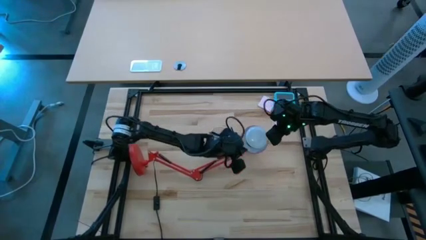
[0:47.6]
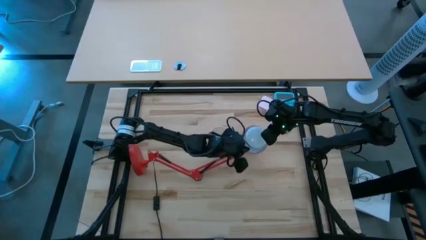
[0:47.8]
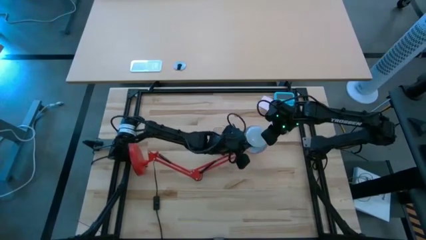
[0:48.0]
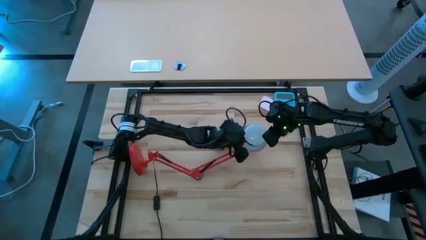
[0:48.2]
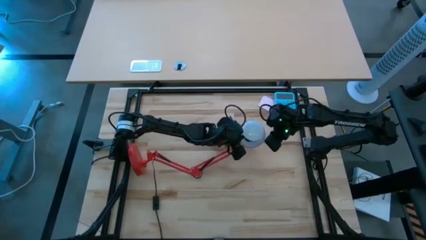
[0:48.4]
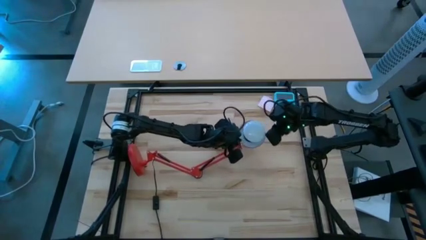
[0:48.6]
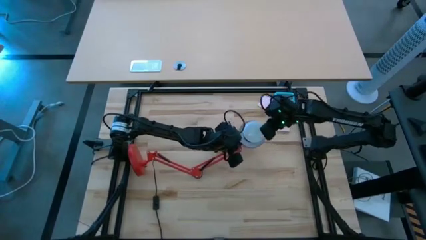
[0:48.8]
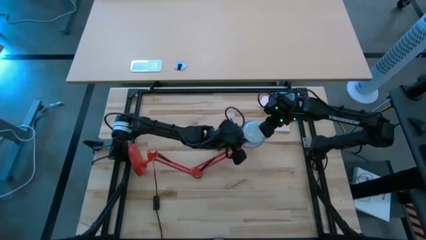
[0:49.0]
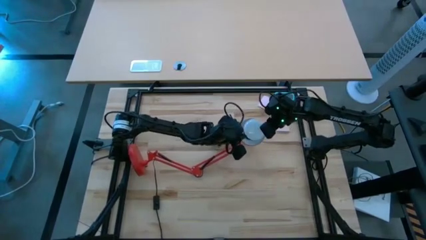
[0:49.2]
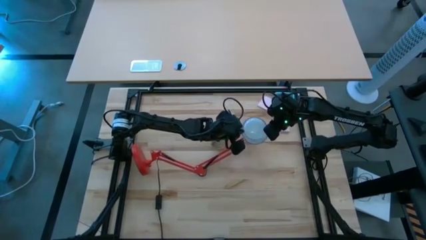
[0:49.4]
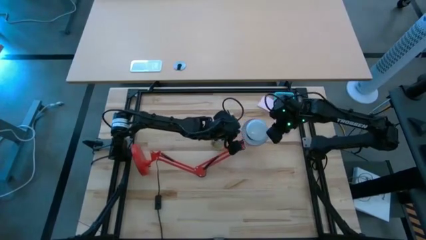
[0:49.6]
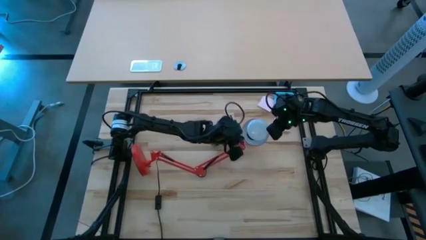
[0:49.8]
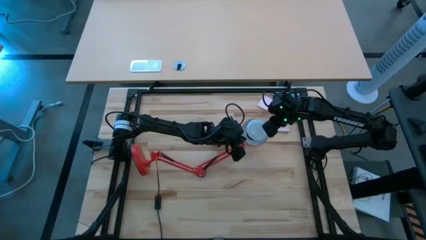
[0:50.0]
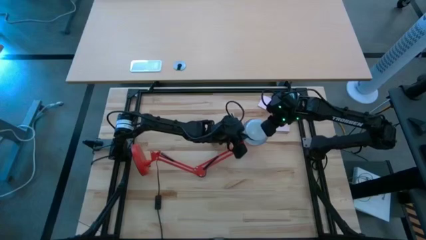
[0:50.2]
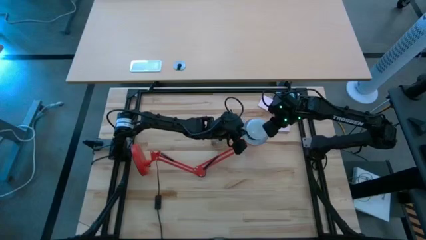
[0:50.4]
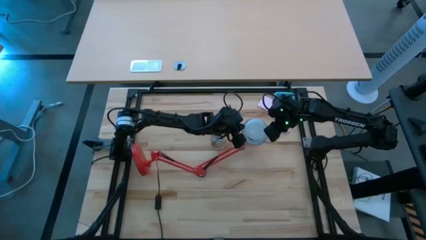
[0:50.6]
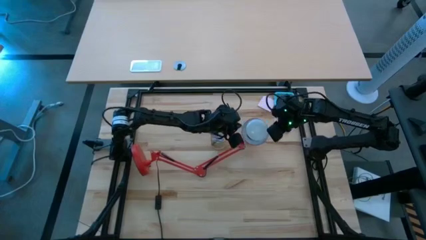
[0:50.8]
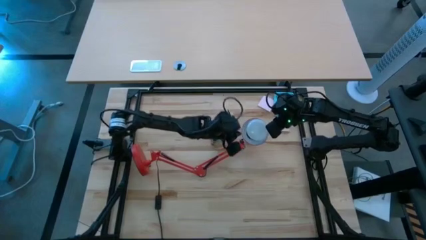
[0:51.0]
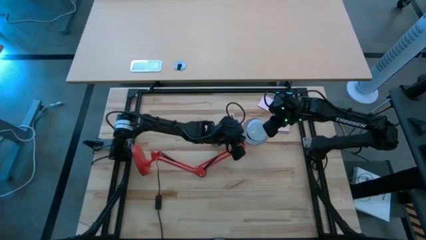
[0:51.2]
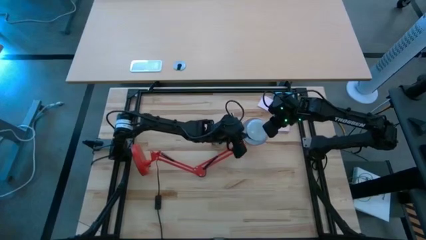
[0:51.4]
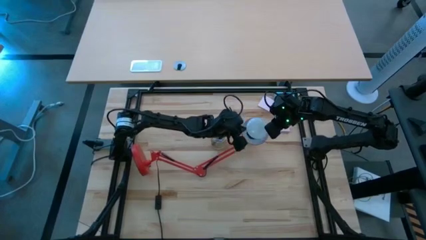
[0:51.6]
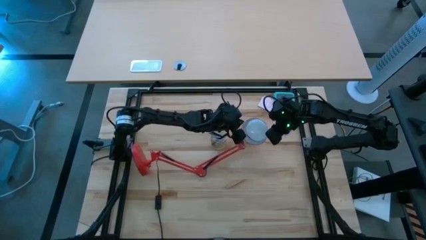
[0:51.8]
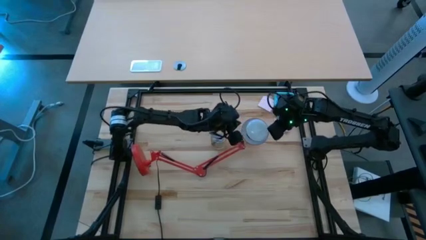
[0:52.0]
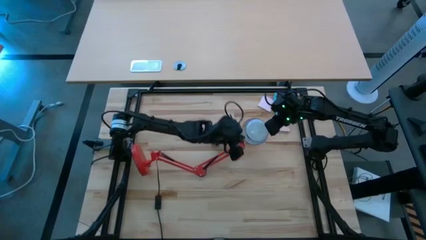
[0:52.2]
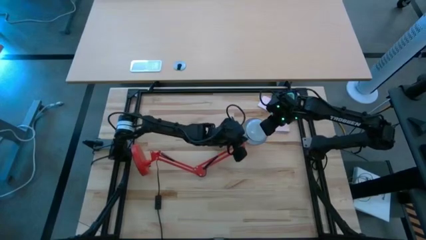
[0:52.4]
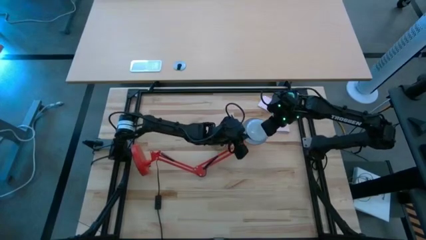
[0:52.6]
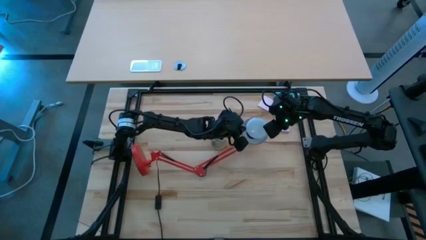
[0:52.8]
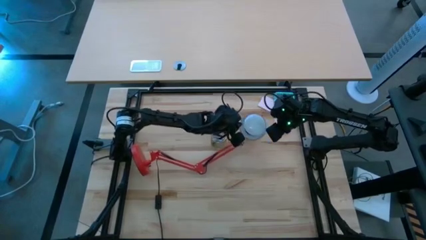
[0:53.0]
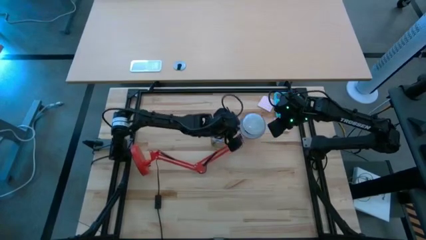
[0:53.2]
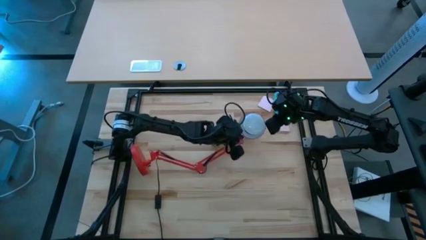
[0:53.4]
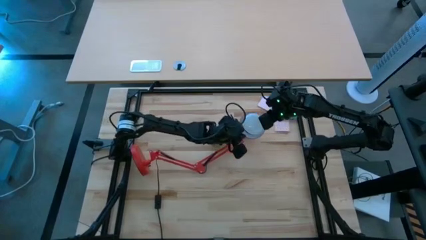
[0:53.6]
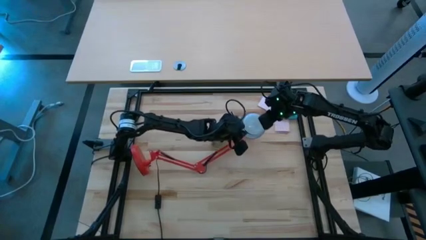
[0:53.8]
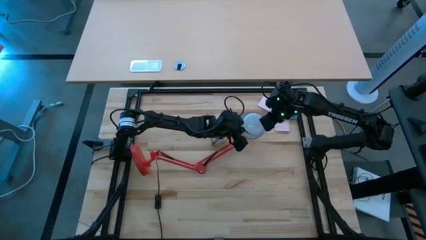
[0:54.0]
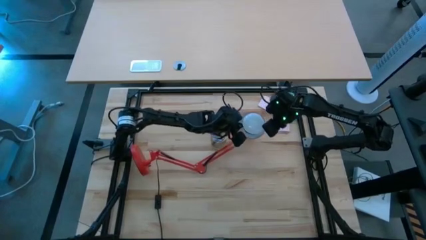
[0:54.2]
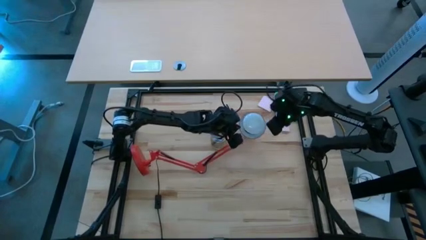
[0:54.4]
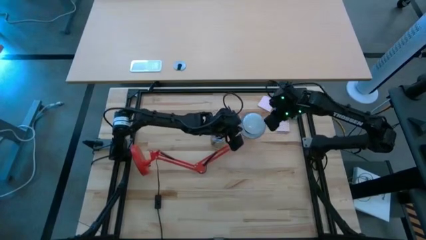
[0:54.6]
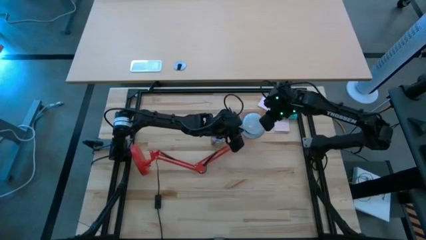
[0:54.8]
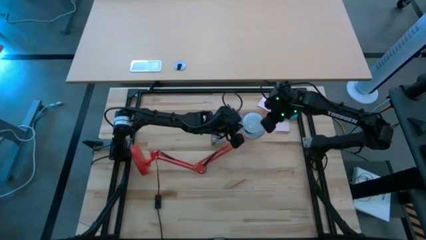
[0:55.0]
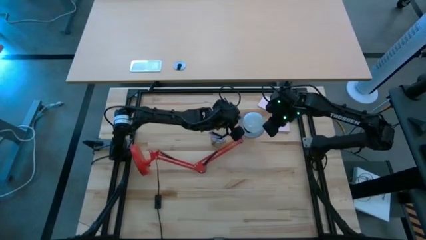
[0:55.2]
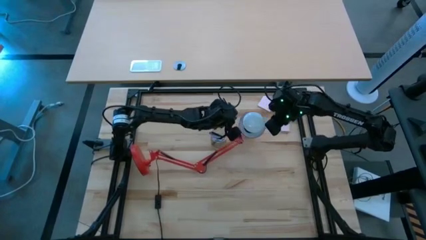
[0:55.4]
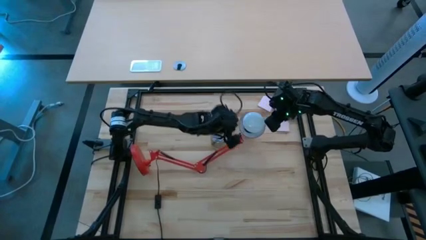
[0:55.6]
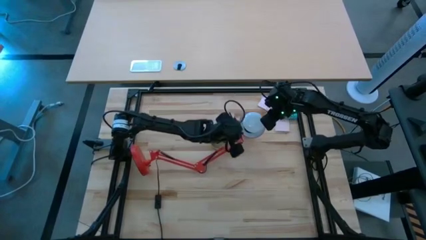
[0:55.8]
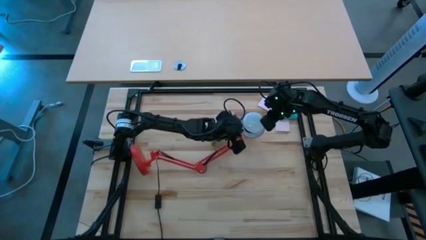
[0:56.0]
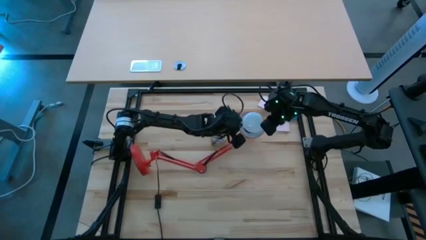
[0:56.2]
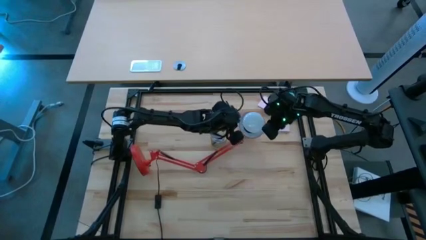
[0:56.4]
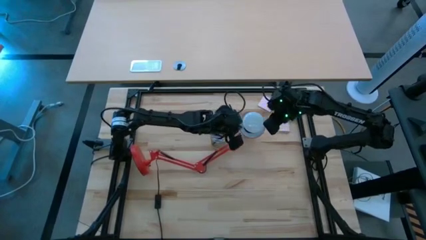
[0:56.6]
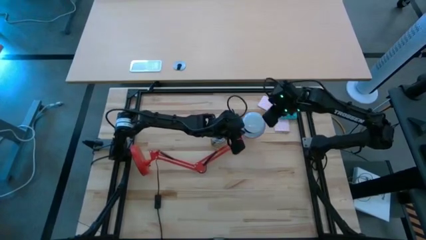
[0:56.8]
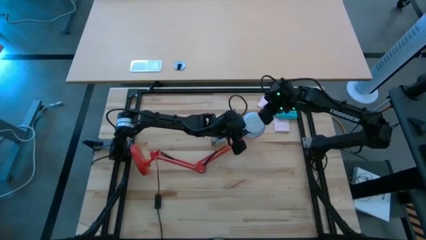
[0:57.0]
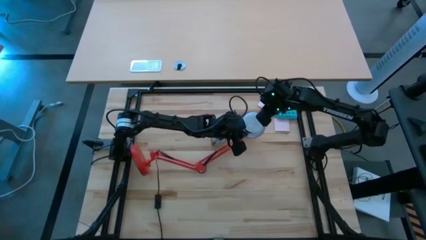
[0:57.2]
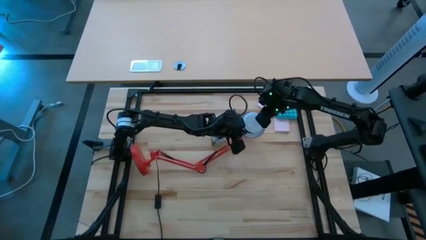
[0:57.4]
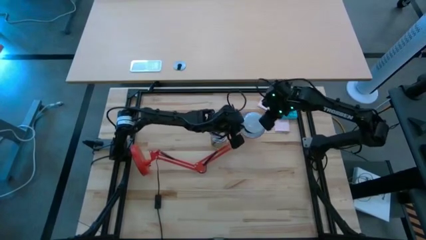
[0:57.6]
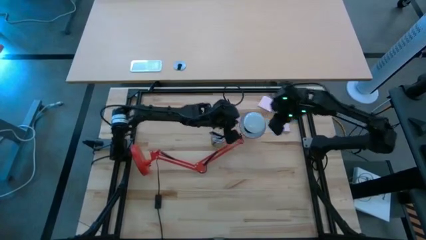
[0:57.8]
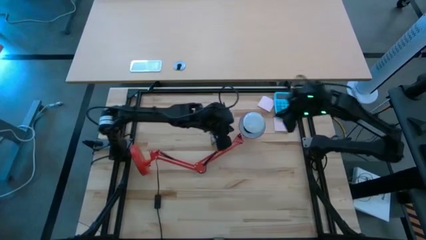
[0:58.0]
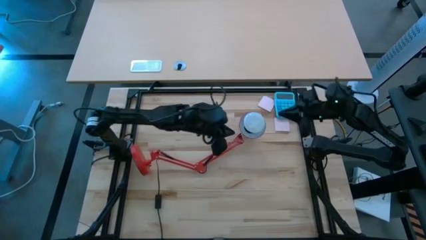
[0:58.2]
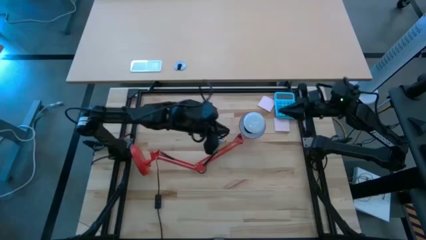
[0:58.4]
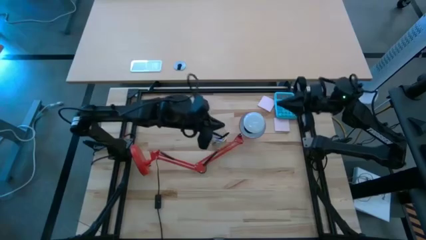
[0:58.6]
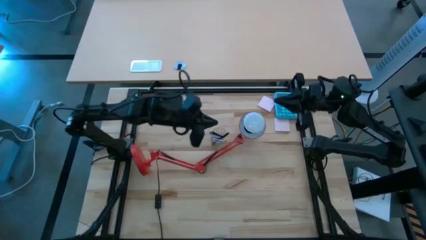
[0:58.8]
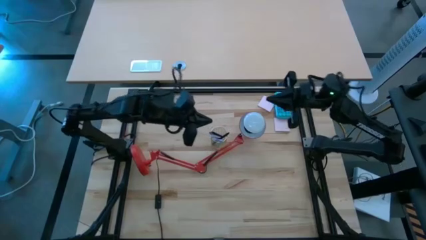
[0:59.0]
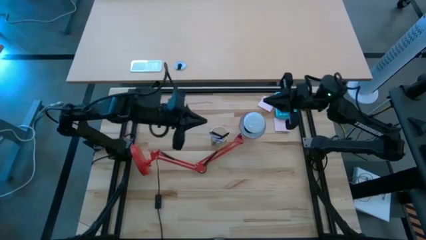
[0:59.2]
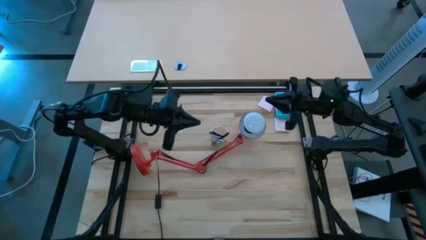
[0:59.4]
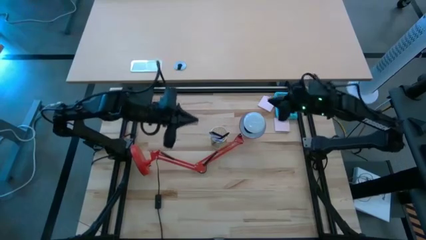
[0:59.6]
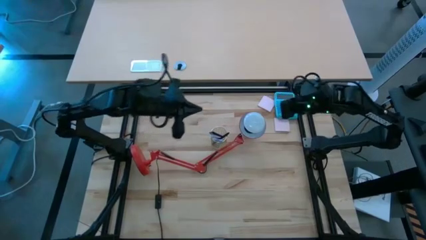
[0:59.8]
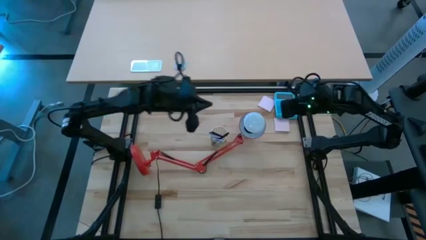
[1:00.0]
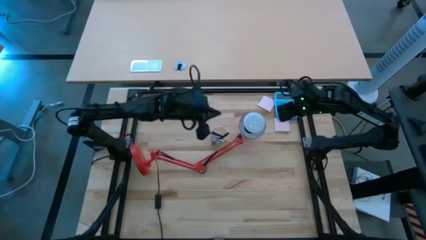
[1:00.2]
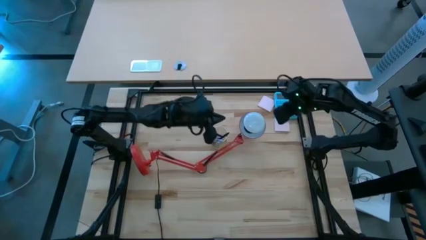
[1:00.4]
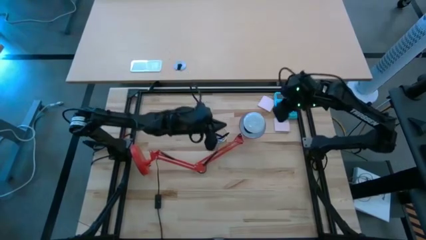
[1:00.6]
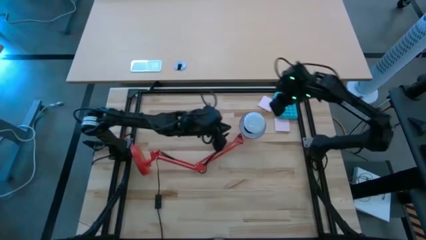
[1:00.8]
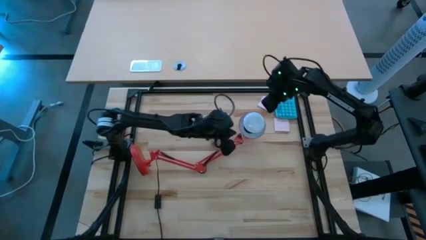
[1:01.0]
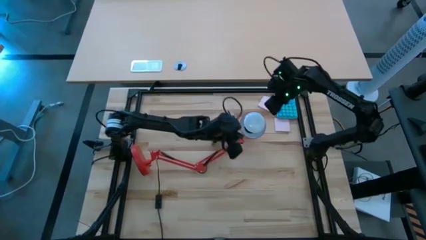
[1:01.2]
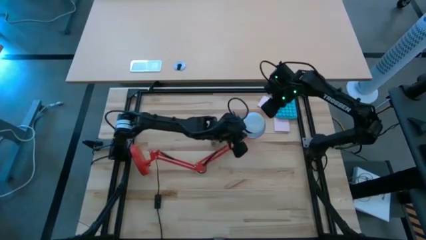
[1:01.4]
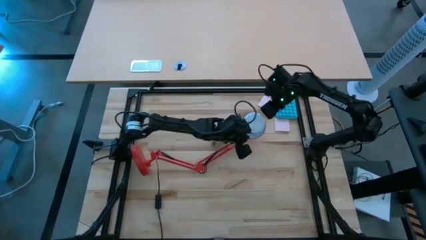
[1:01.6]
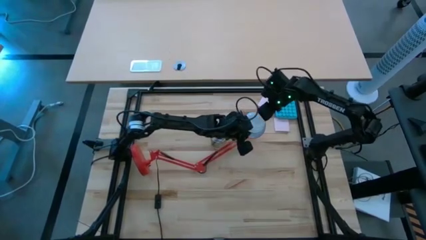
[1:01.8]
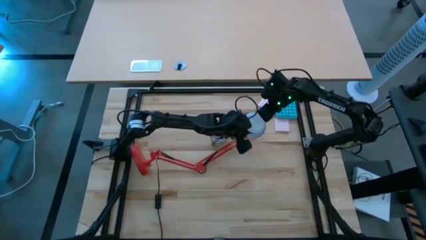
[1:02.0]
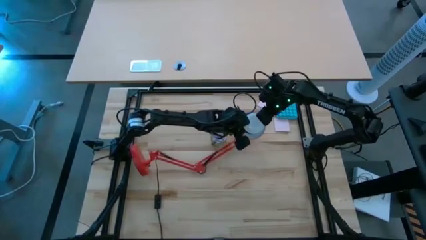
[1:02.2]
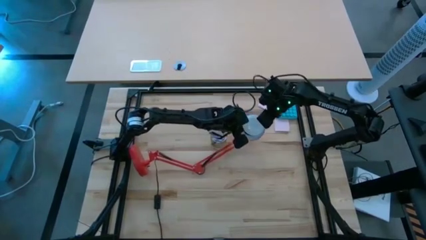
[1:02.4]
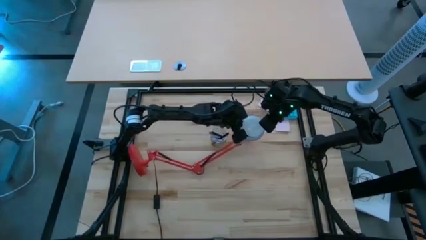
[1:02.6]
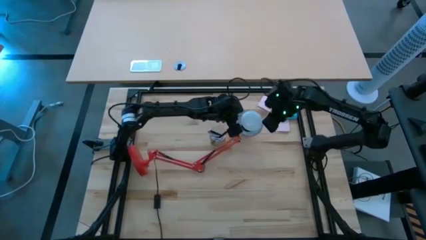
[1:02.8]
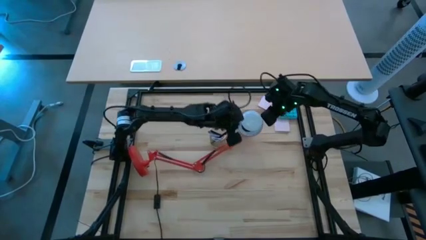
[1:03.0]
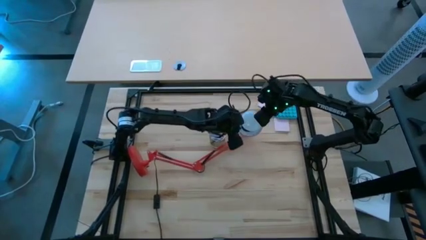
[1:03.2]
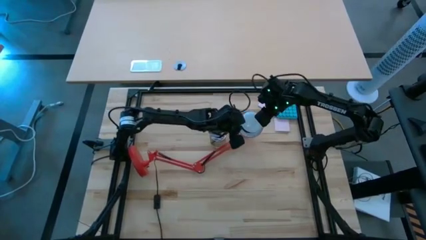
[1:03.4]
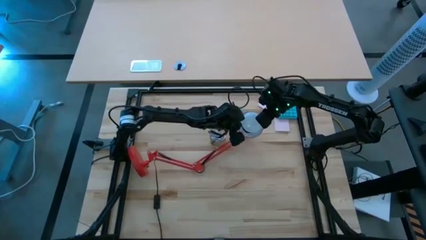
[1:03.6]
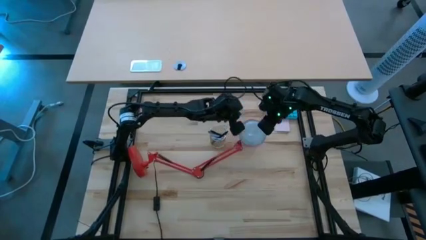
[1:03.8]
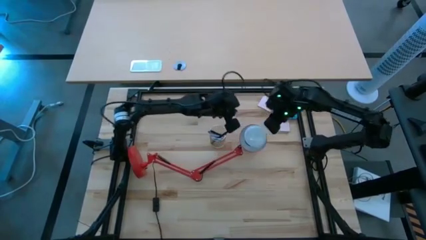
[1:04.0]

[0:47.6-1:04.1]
Task: Screw lightbulb
Insert the light bulb into the lamp
